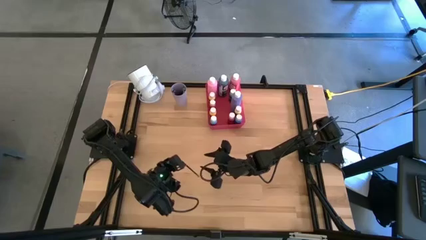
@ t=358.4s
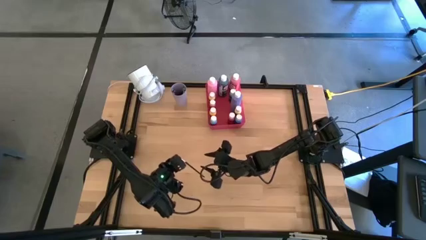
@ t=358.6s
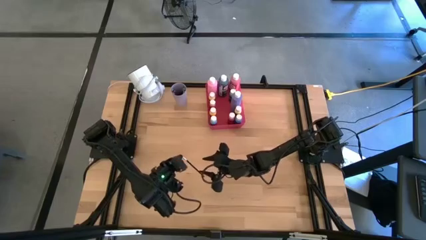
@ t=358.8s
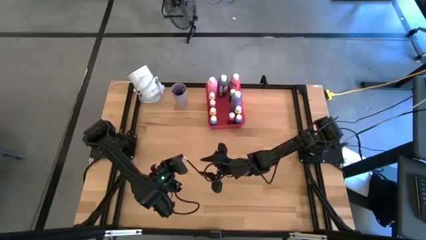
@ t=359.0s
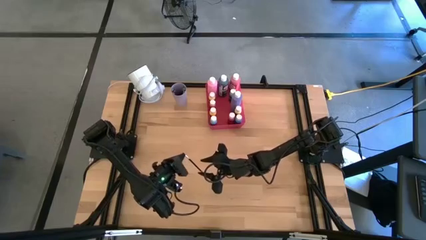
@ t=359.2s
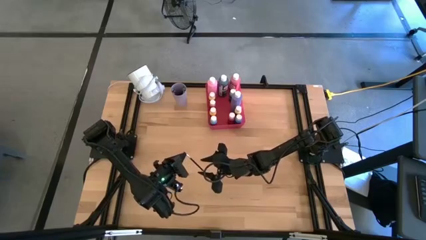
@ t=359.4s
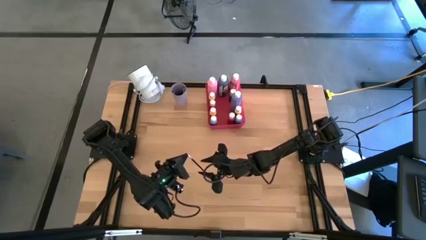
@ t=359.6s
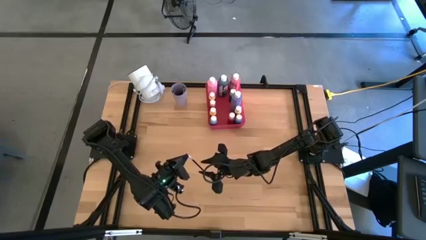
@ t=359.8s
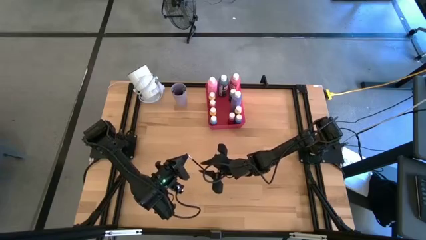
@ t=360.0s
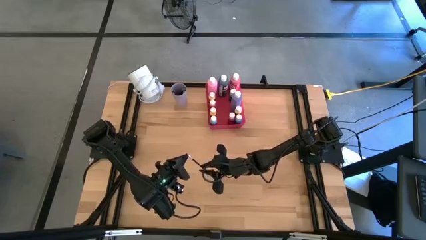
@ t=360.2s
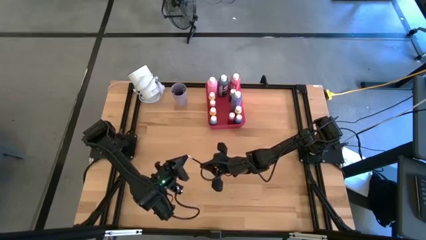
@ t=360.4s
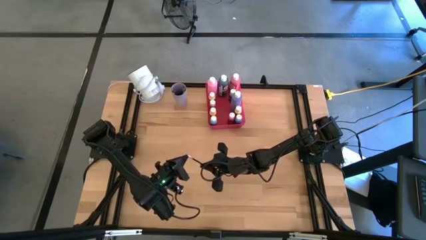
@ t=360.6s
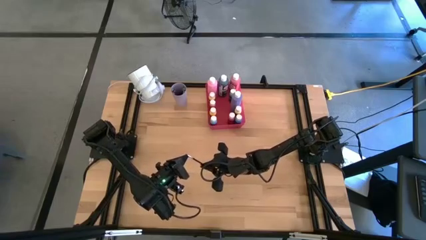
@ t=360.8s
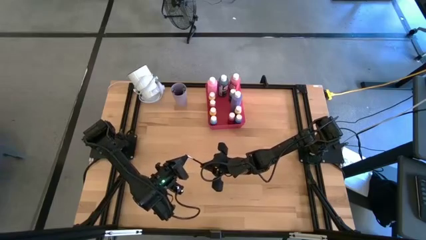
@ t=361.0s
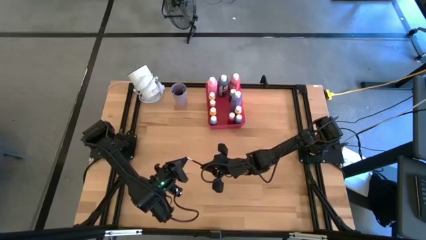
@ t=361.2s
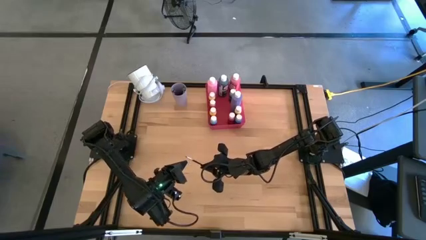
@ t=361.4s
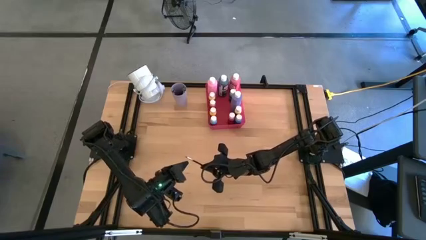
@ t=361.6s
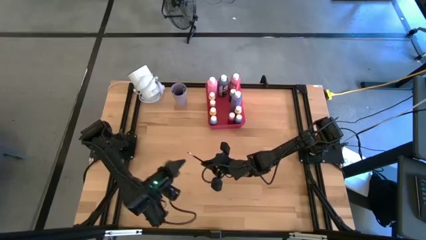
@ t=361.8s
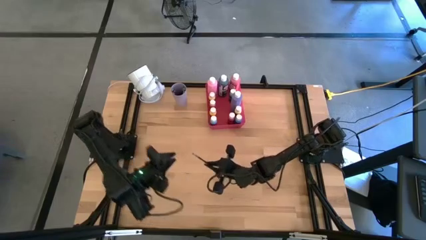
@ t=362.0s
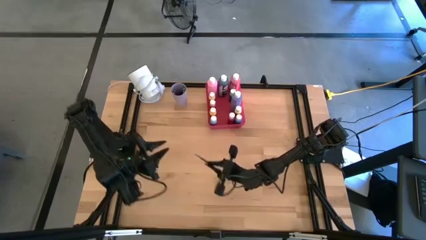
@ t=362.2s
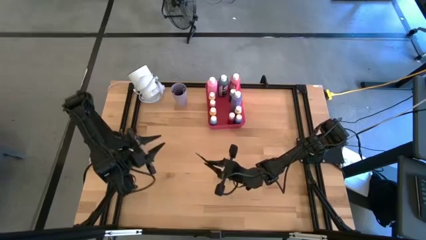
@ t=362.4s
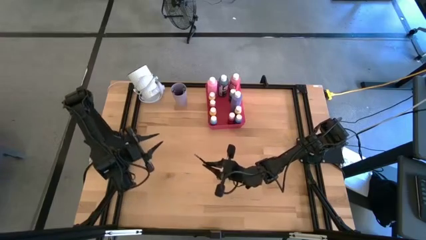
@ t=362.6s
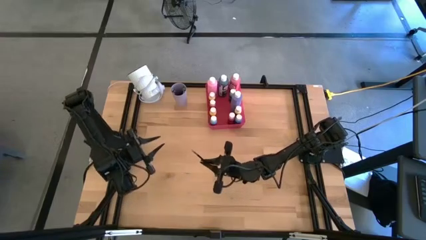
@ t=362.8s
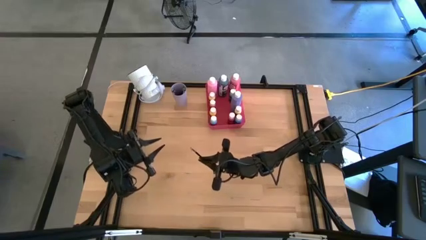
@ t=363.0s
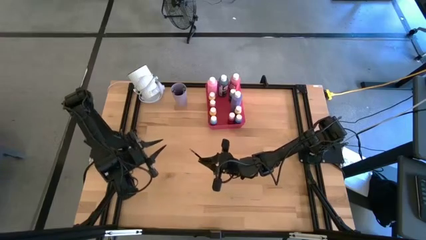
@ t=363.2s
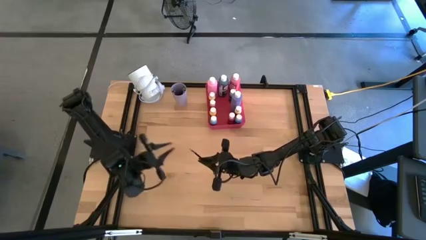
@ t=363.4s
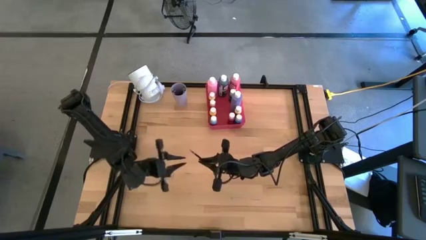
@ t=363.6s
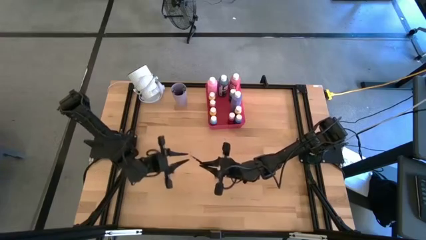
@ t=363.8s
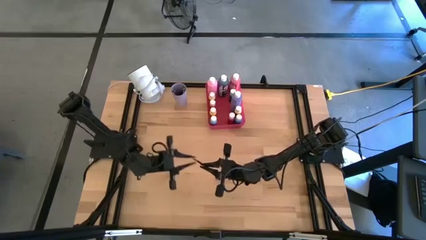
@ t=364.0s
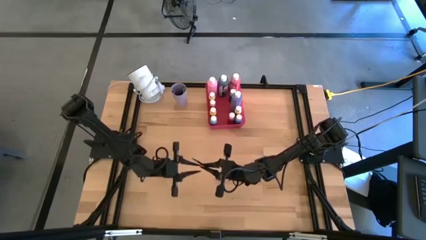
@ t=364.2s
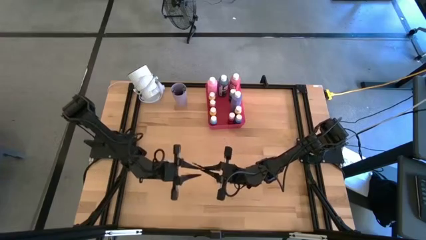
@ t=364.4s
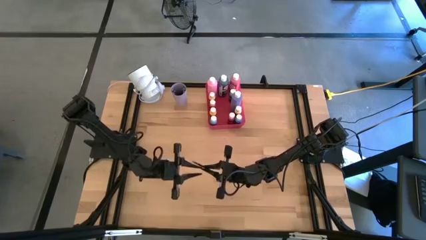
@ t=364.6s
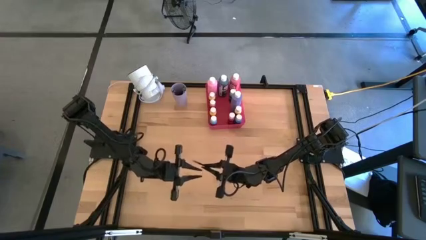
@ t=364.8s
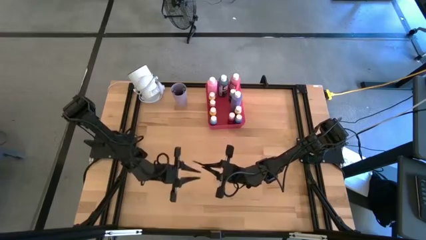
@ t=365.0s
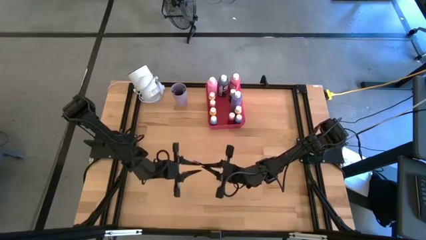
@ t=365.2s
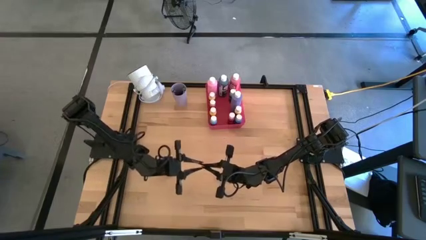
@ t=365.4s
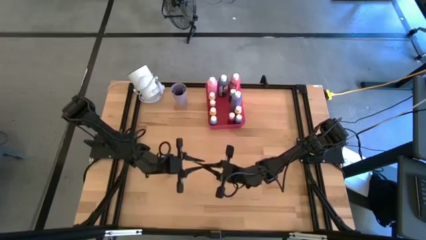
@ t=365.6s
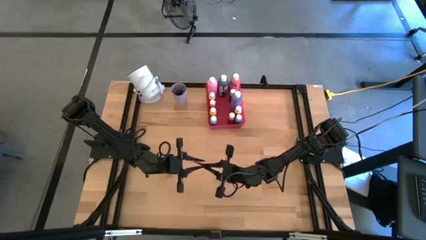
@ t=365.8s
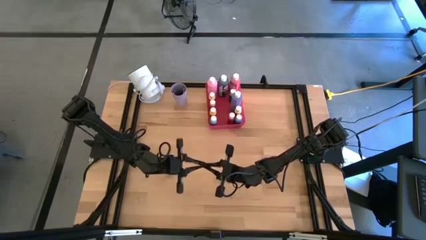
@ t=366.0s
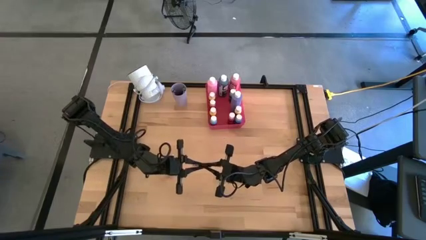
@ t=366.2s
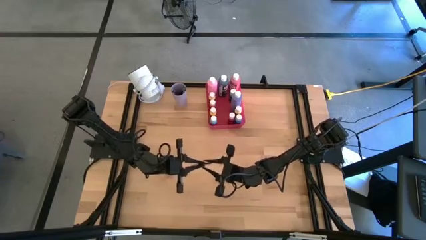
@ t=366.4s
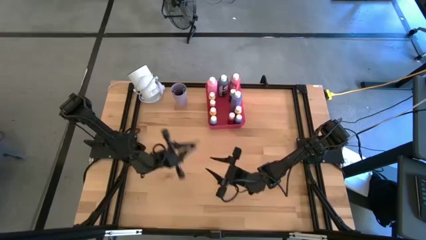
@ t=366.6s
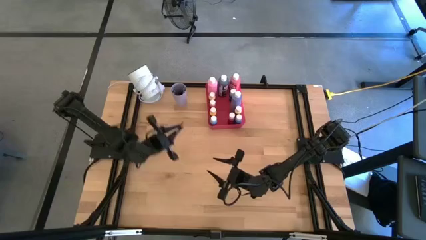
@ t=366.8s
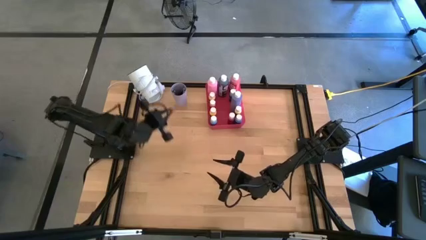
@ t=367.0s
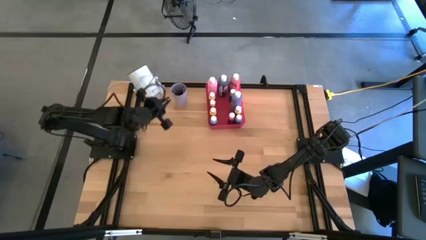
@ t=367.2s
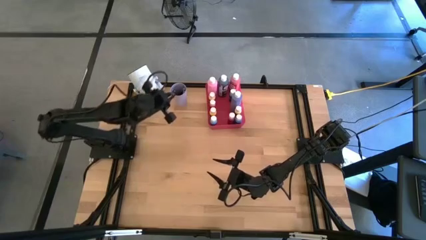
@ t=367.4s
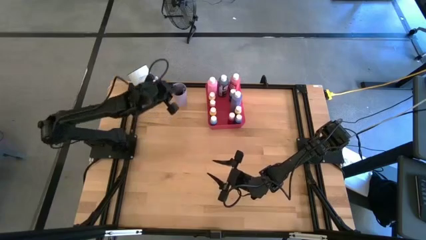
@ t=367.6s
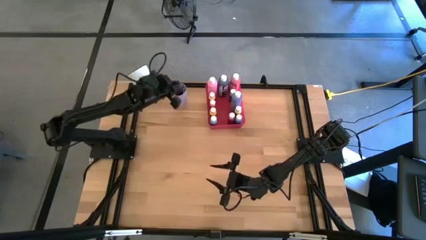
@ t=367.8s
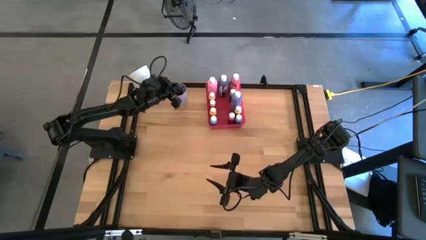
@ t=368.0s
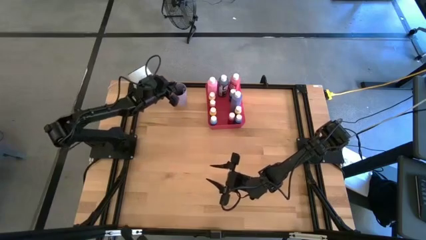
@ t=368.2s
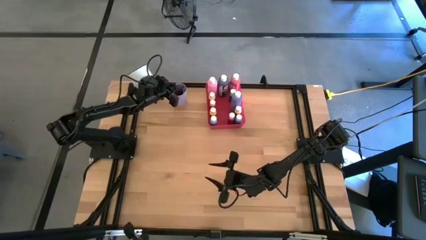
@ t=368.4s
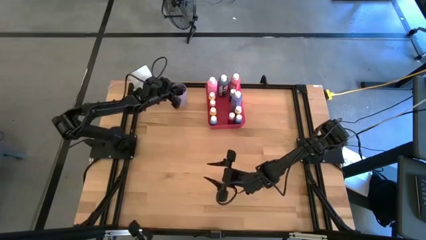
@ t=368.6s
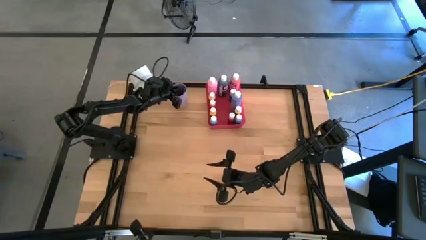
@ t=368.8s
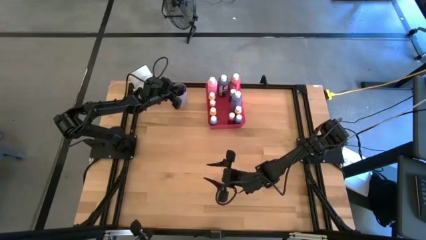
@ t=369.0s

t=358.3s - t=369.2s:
Task: Pick & Place Paint Supplies
Put the black paint brush into the purple cup

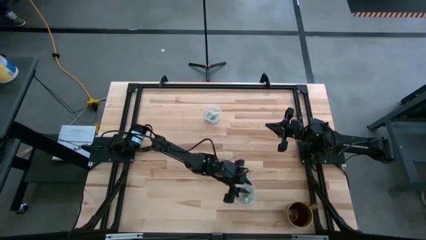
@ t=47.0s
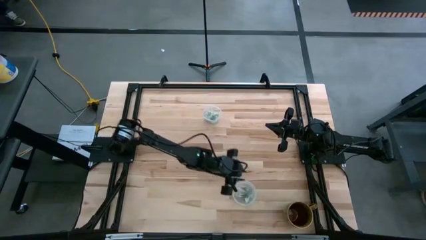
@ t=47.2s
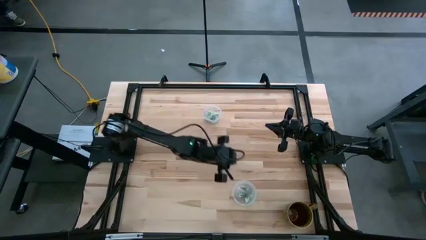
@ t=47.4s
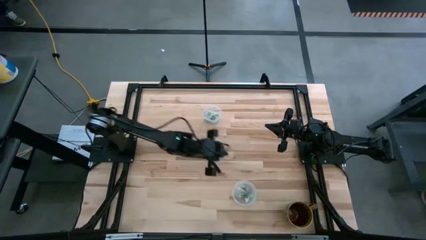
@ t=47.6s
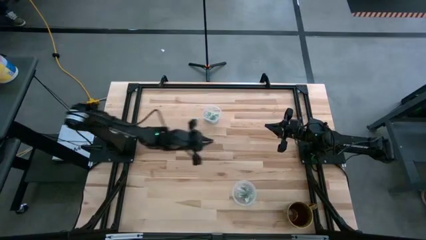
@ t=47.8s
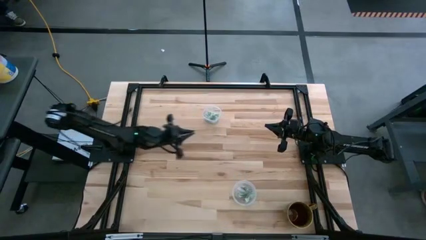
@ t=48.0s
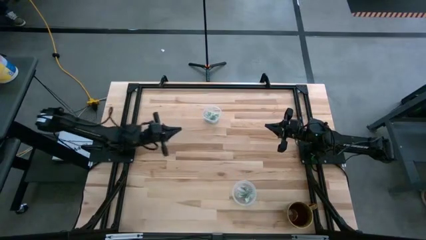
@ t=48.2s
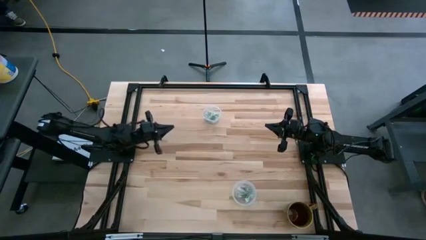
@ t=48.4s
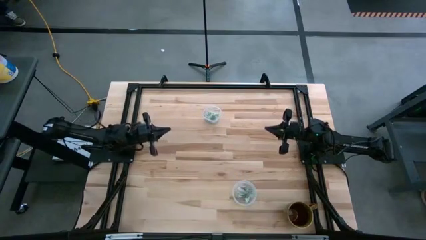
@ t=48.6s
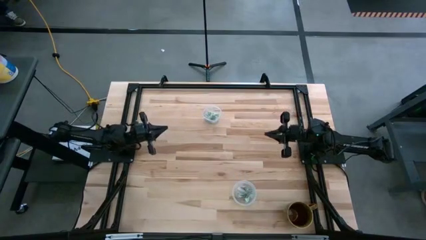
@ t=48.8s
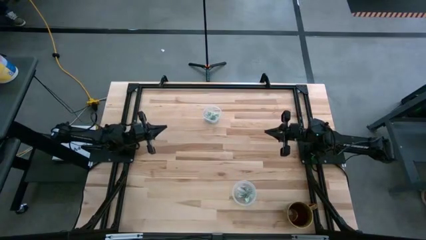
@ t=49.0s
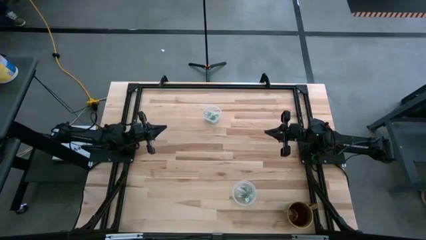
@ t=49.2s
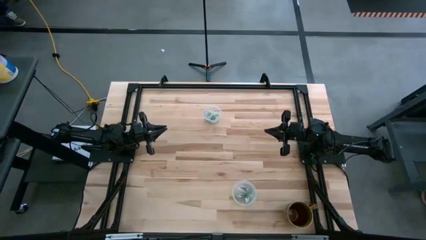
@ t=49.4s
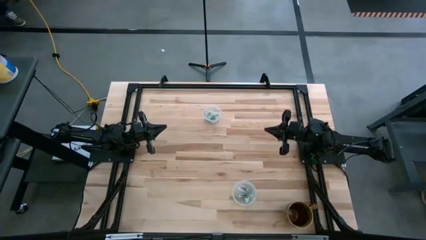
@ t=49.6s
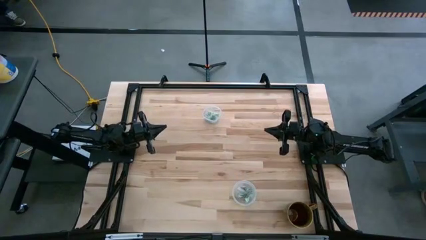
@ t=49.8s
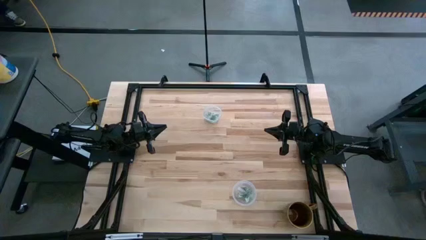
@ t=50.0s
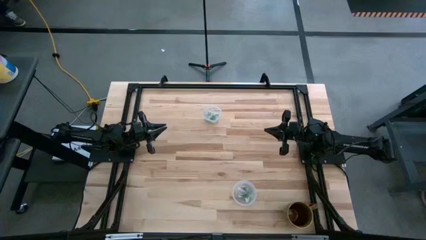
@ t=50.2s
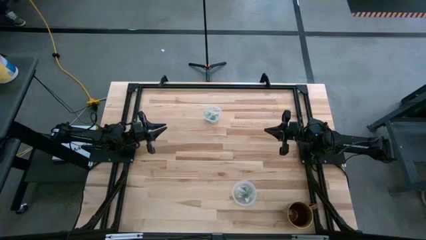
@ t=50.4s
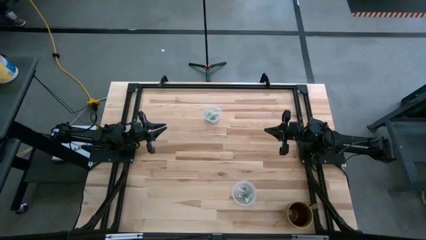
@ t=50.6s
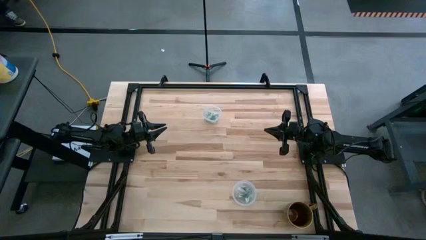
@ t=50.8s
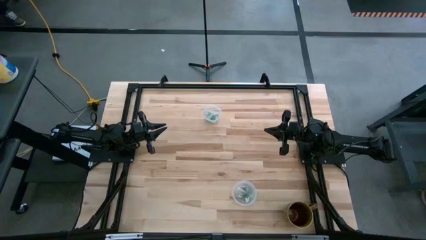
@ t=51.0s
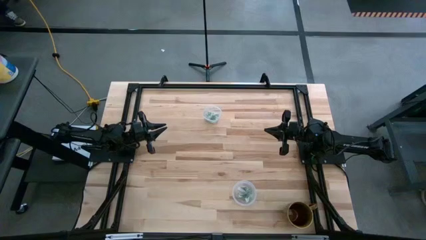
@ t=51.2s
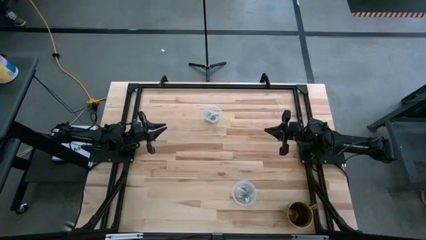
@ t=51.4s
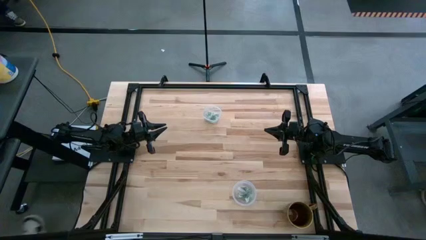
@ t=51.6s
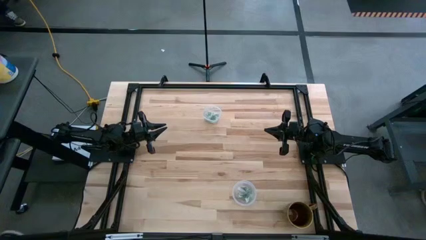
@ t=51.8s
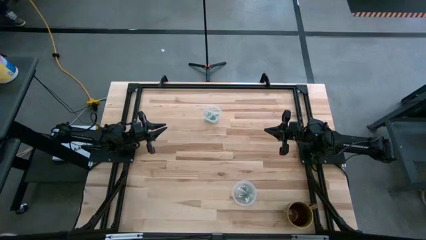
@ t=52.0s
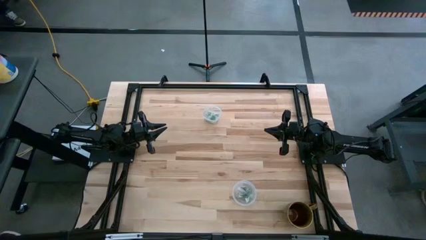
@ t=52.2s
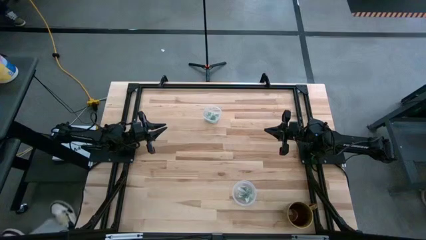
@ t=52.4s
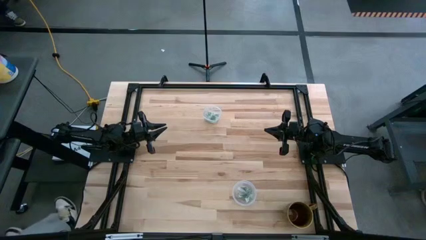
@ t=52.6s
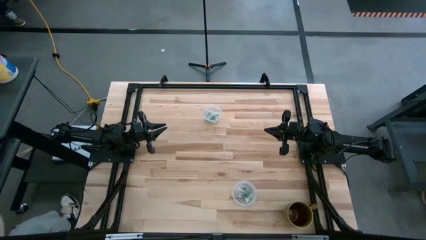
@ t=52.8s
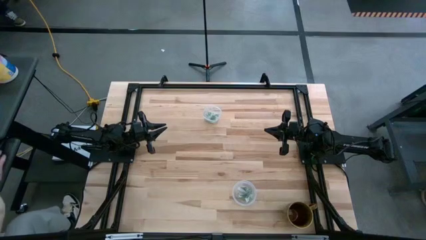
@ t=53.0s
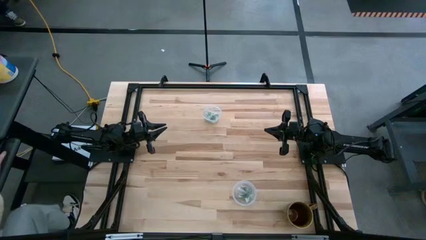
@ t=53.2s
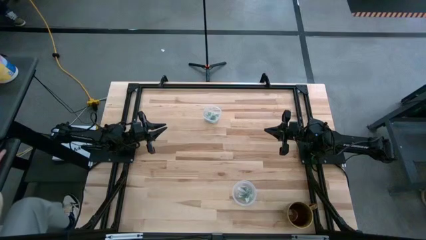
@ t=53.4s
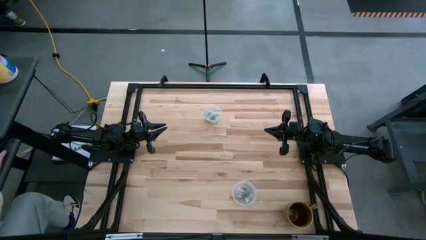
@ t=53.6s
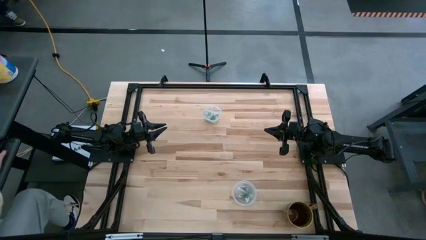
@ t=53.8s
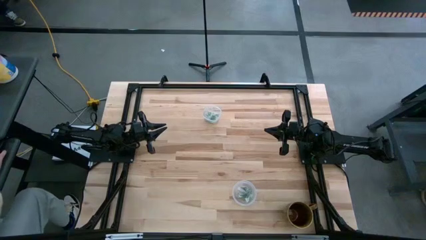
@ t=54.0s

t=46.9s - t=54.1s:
Task: Pick and place Stevia / Truvia into bins
Return to Home Position
